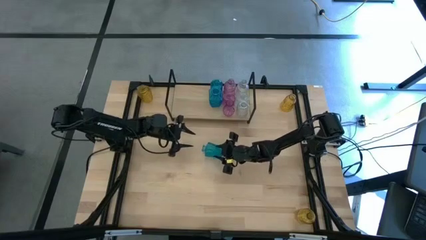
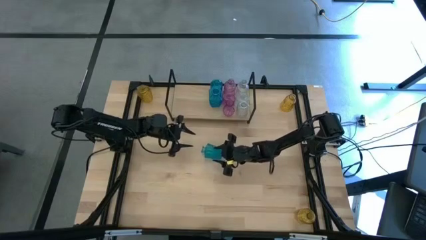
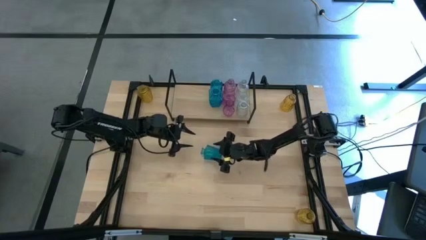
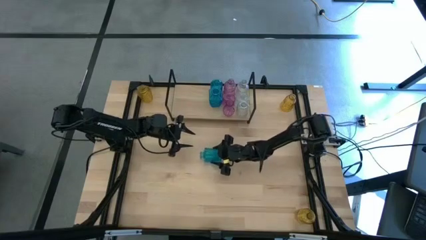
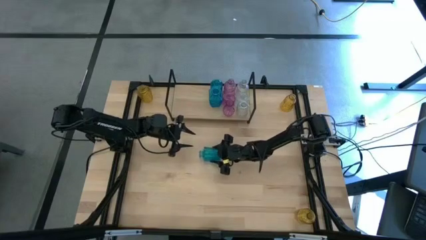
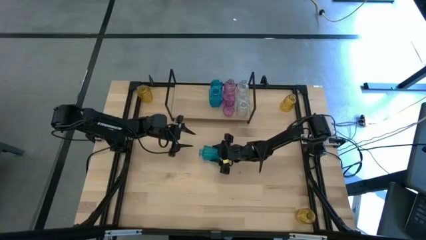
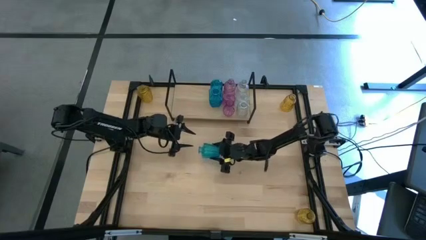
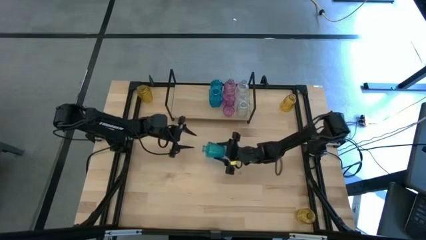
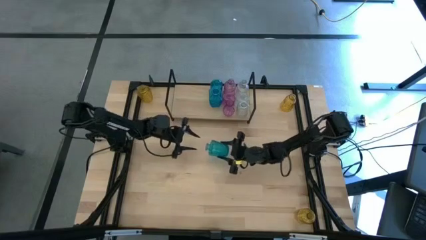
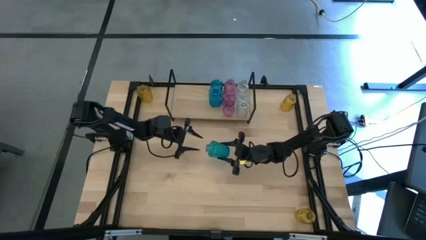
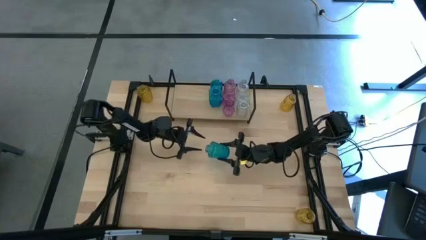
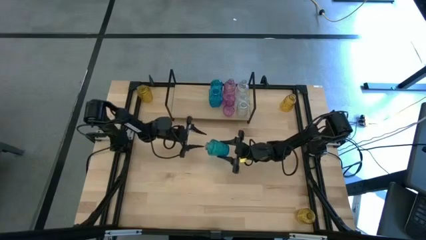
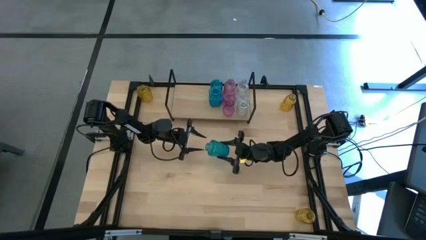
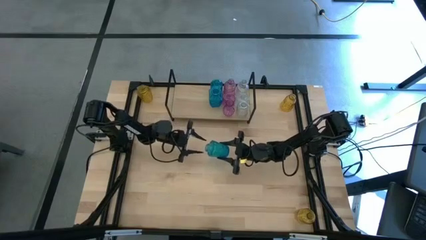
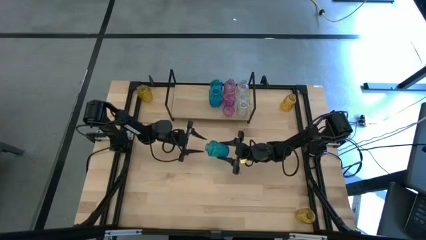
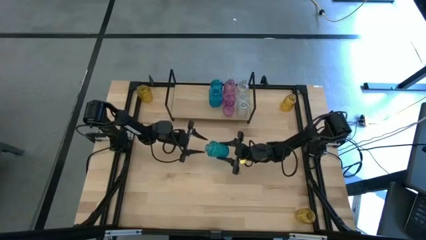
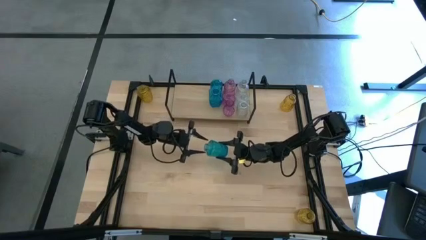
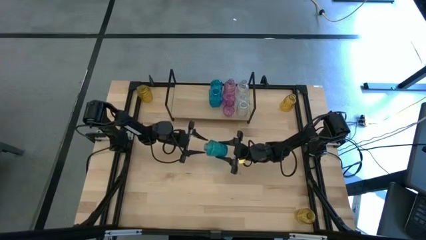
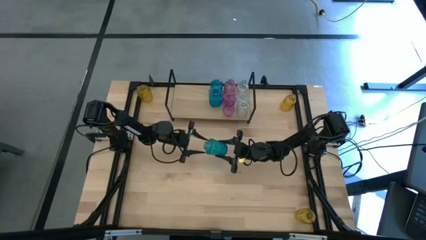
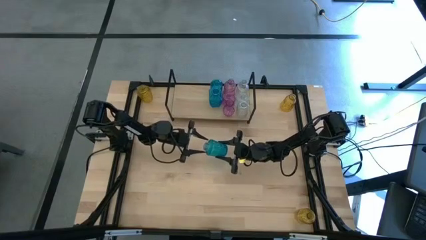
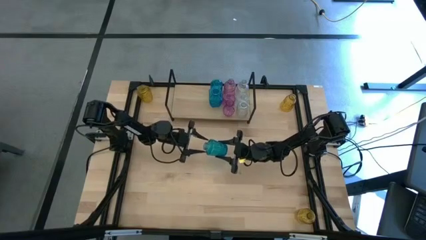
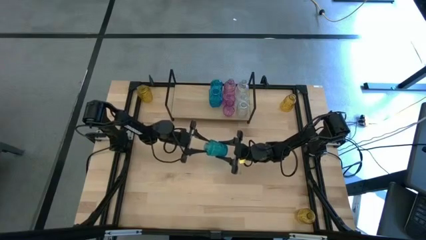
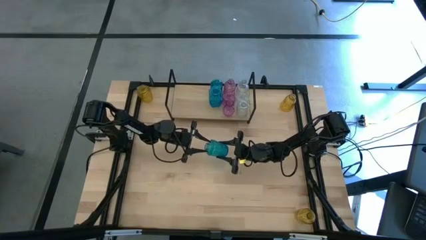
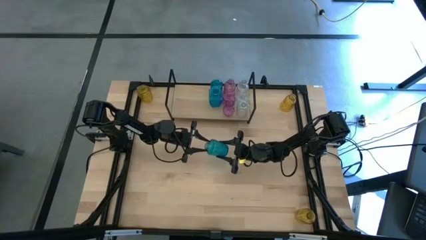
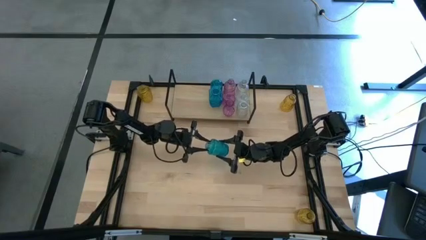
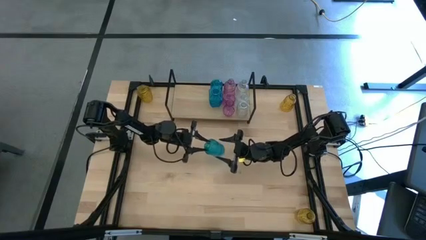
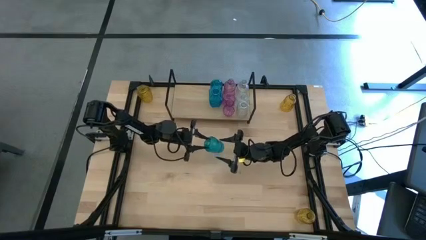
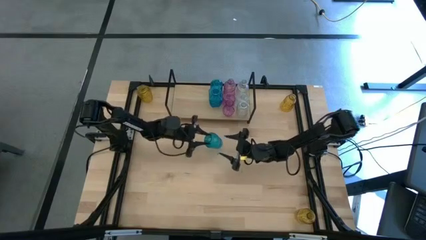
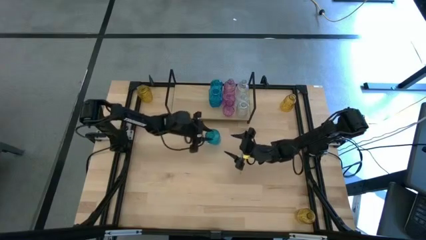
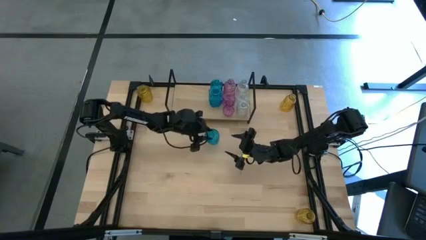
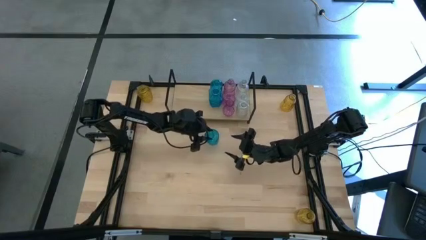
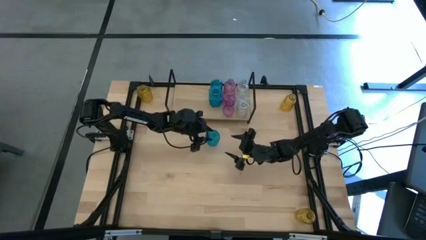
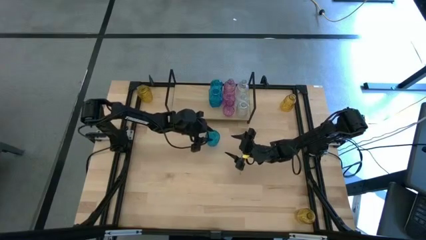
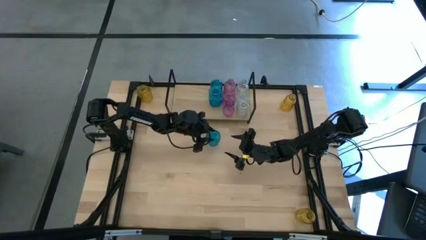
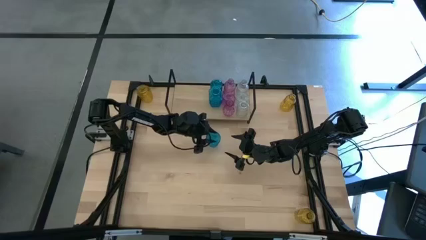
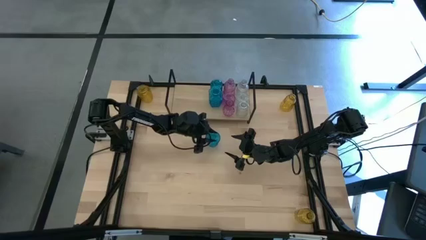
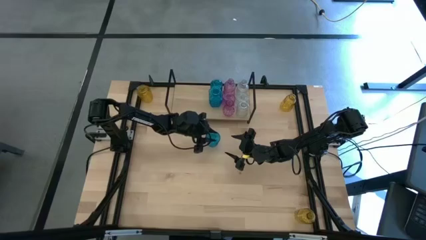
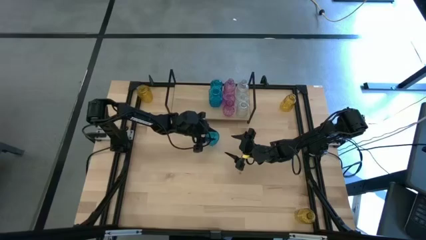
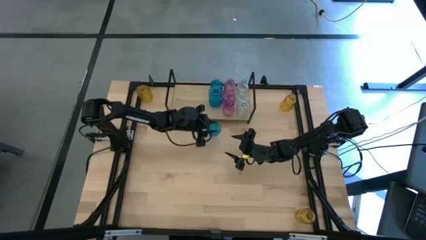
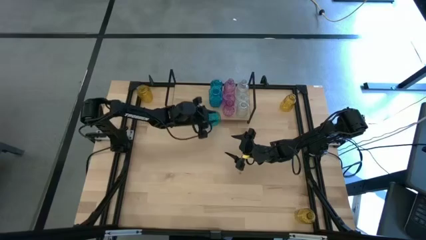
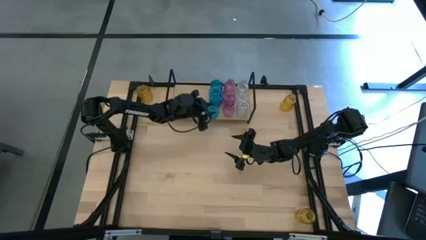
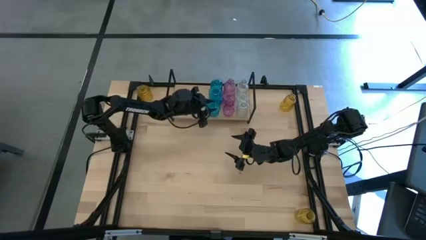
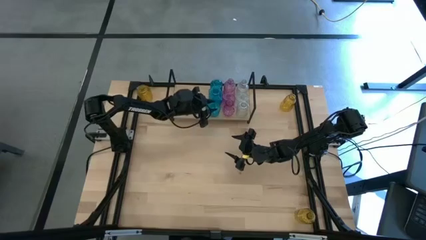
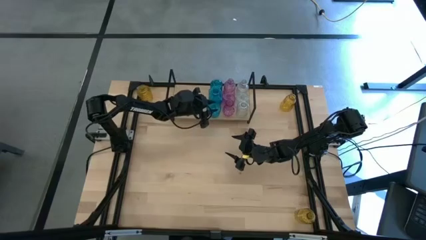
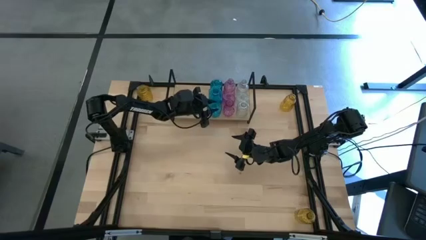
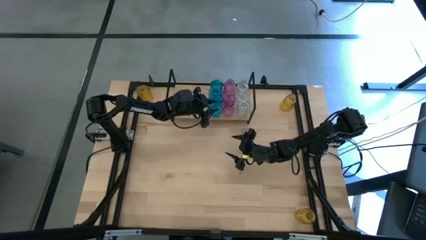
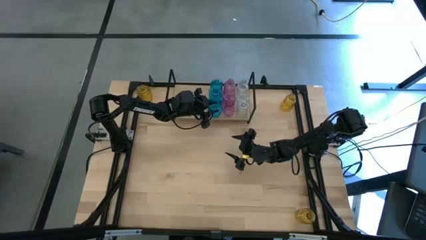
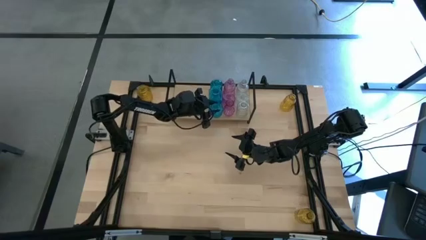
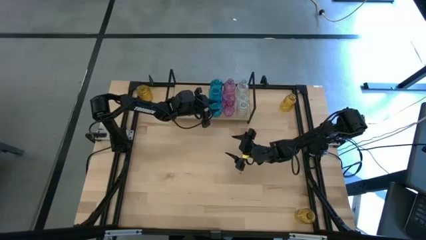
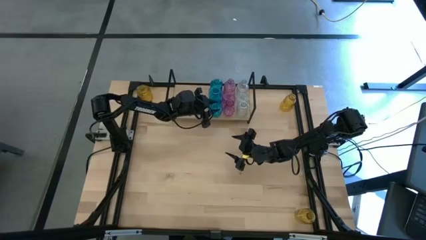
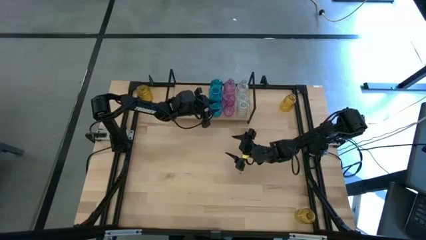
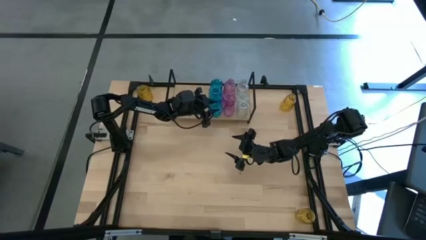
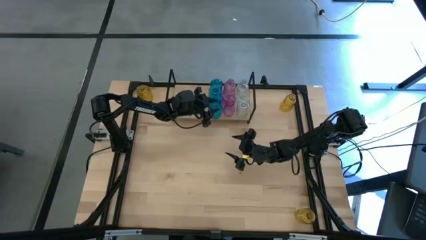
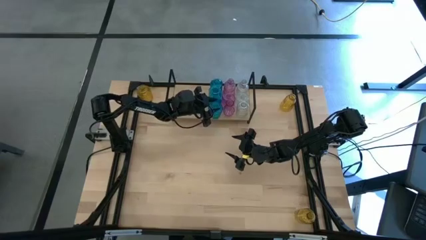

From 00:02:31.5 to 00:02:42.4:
Task: sort vases onto shelf
Put the blue vase on the shelf aligned with the other blue vases
